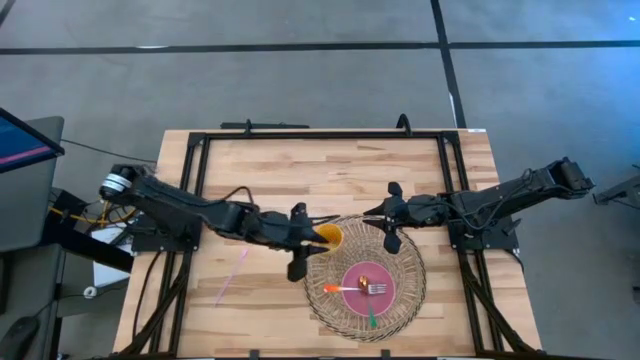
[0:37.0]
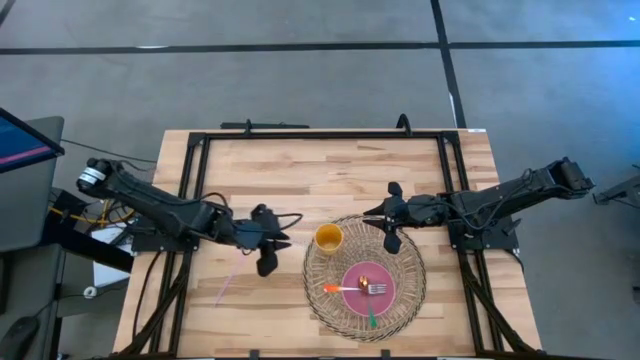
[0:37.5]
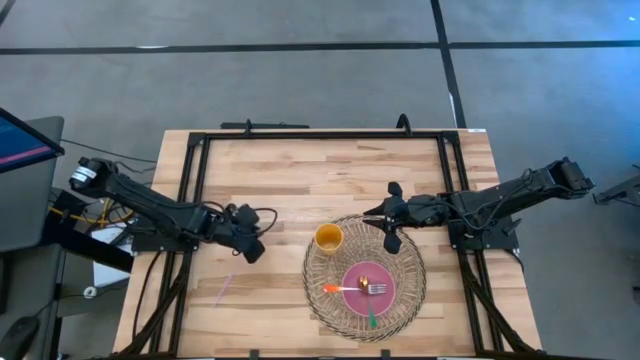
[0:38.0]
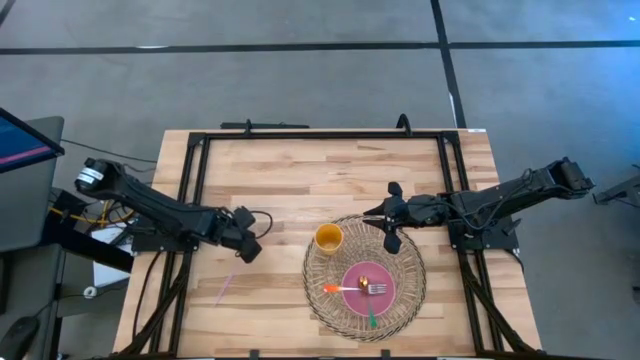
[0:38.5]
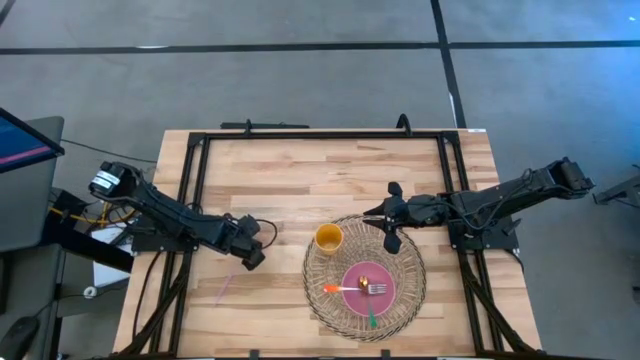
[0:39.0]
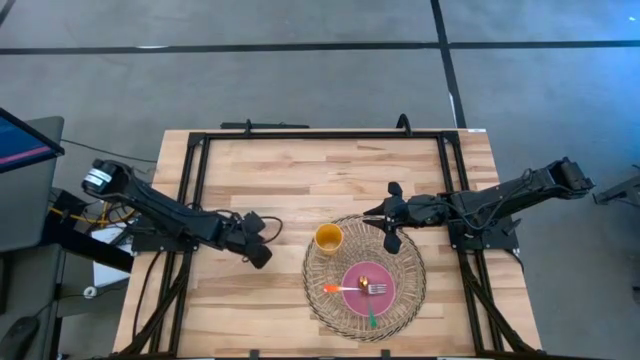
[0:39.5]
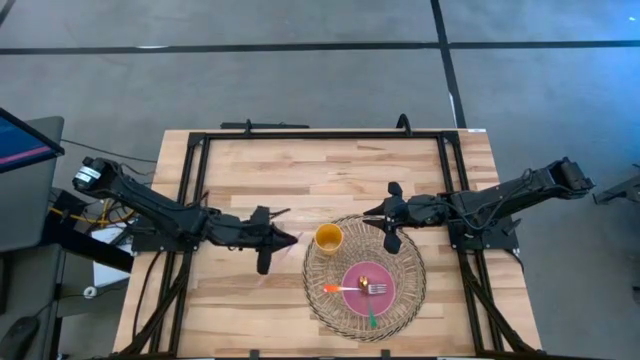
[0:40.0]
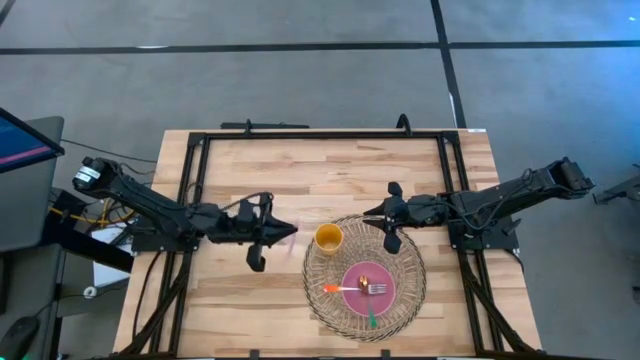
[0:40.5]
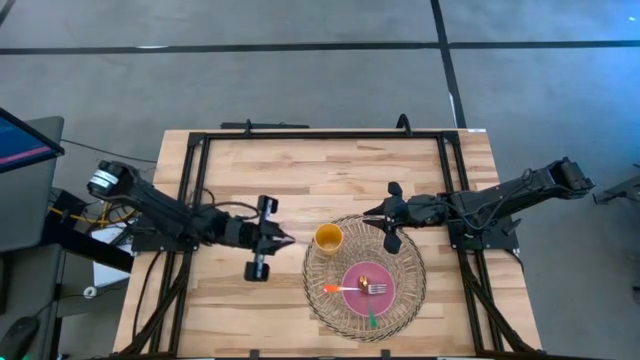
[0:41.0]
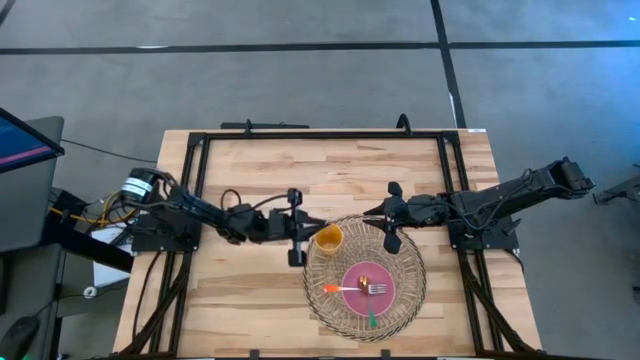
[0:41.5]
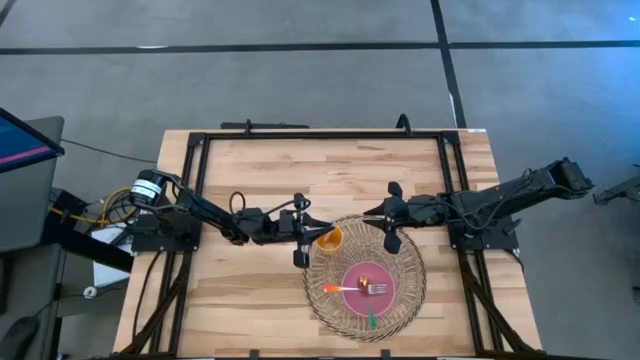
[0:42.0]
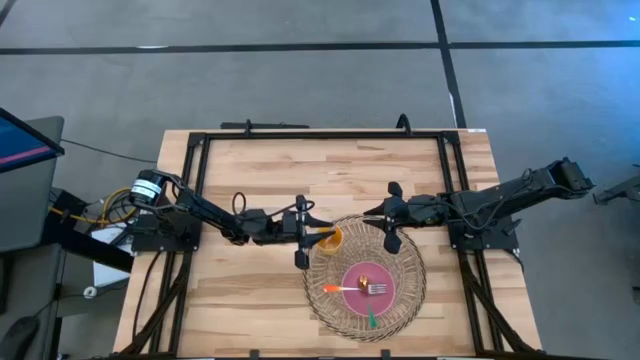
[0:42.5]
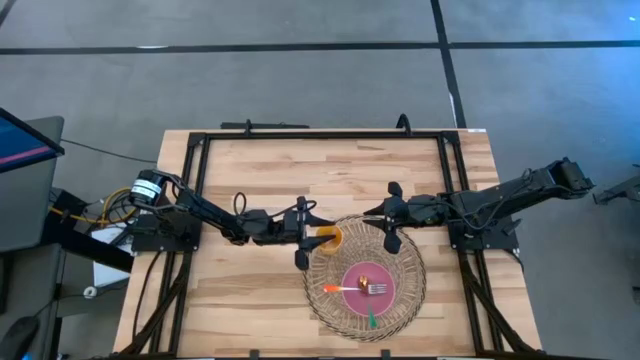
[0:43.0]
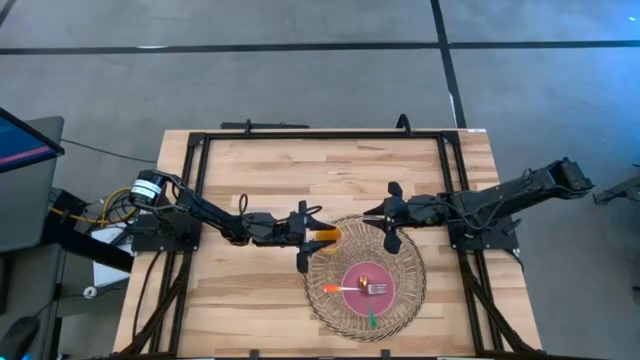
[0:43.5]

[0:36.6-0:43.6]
Task: Pick & Place Utensil
Put the pink straw into the yellow cup

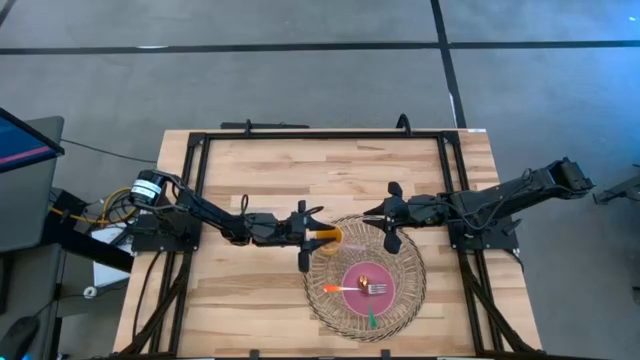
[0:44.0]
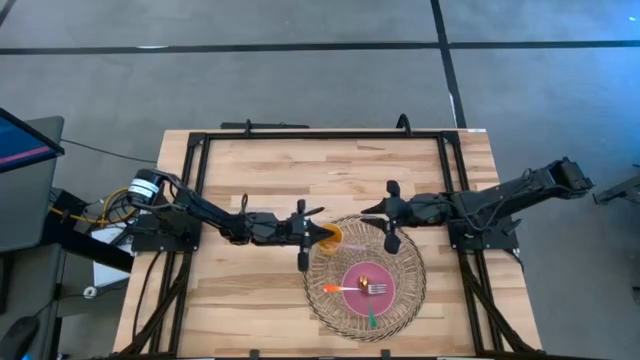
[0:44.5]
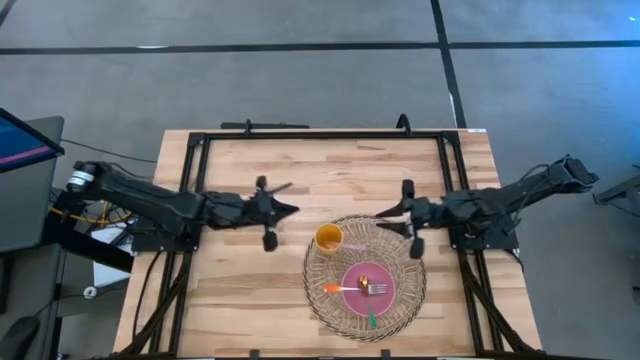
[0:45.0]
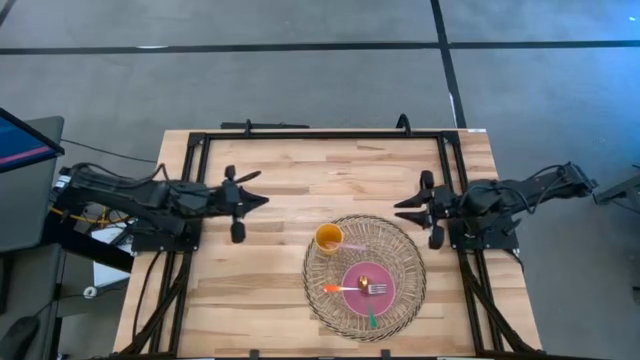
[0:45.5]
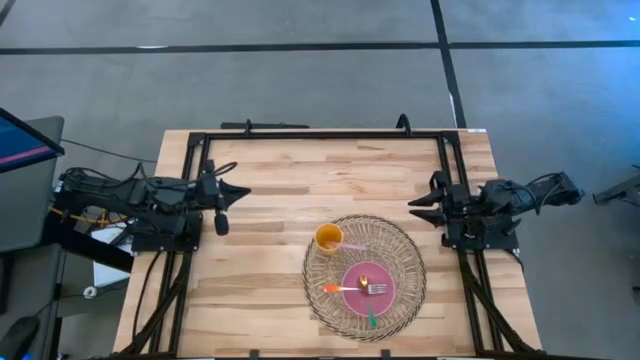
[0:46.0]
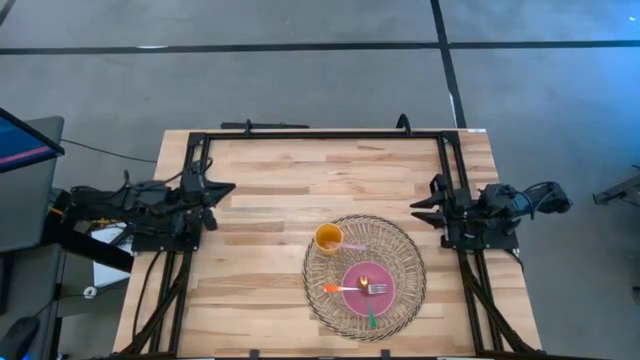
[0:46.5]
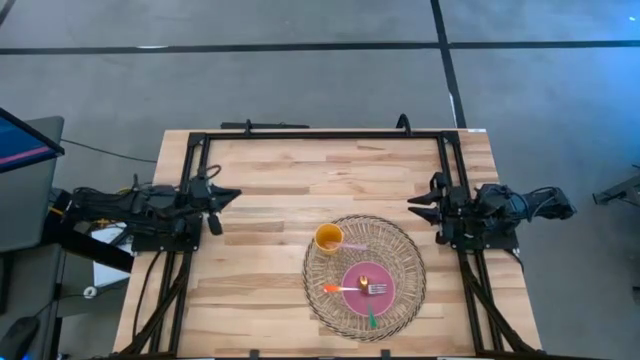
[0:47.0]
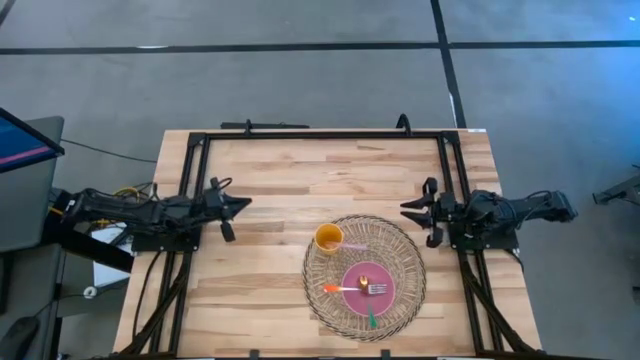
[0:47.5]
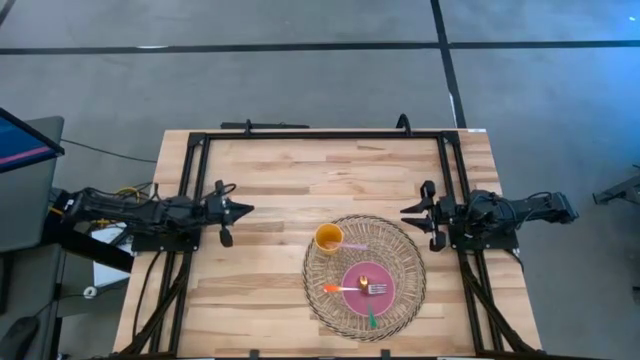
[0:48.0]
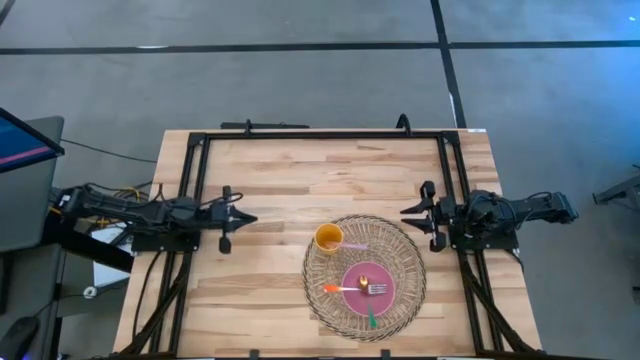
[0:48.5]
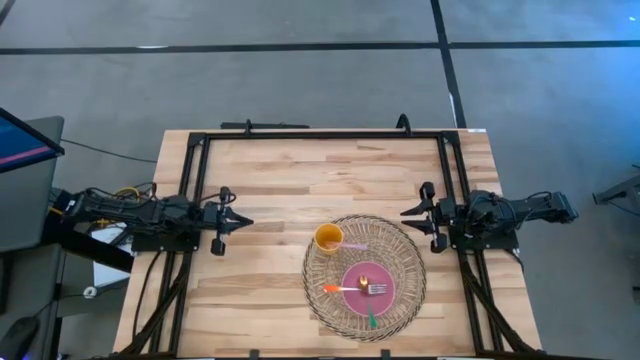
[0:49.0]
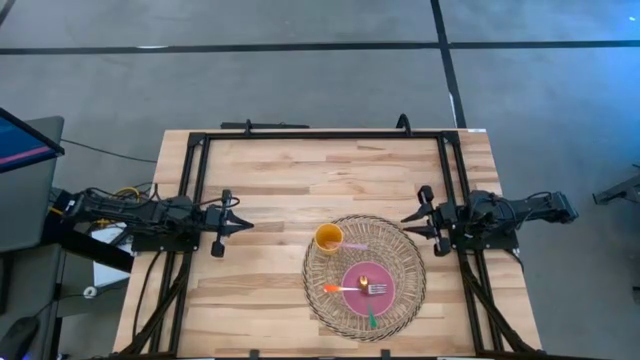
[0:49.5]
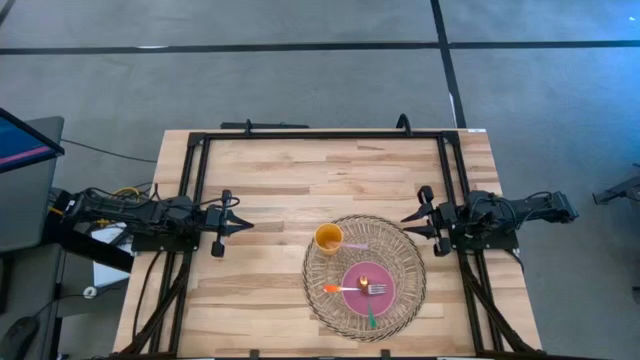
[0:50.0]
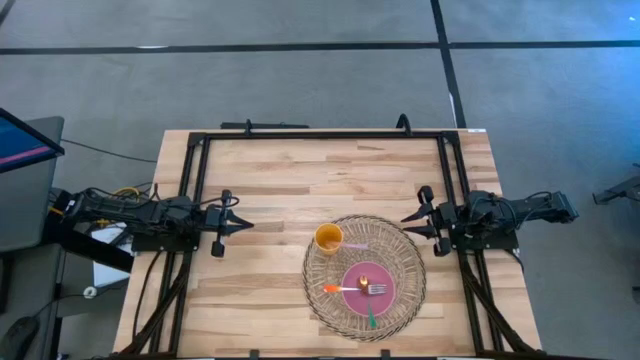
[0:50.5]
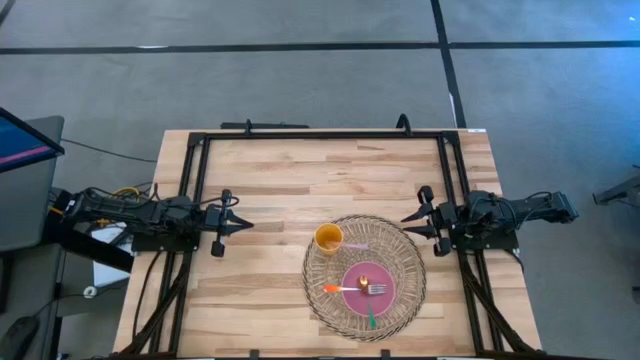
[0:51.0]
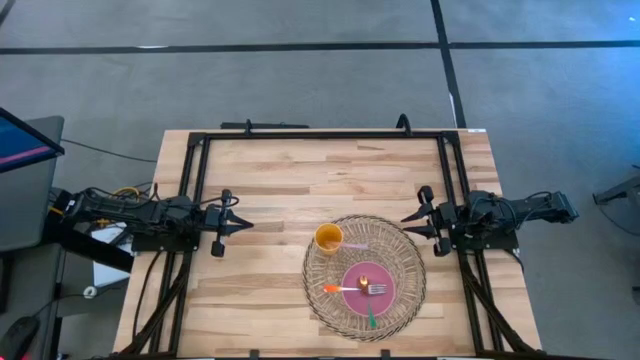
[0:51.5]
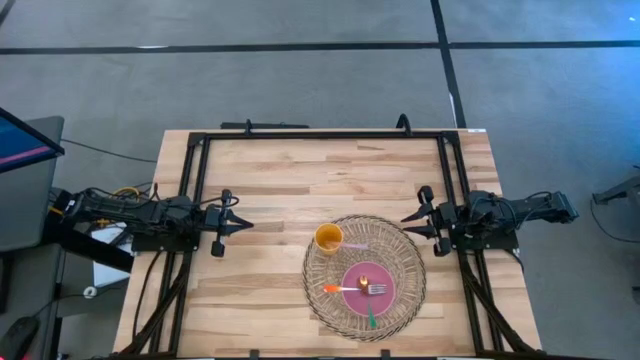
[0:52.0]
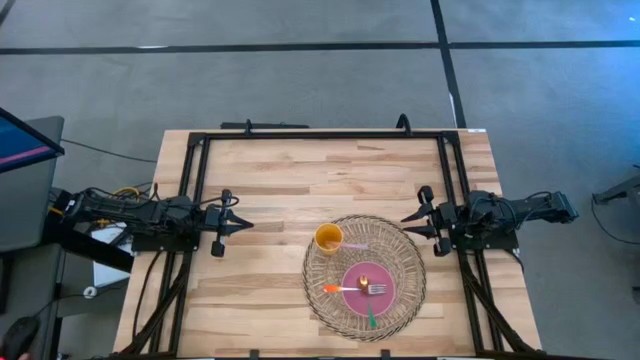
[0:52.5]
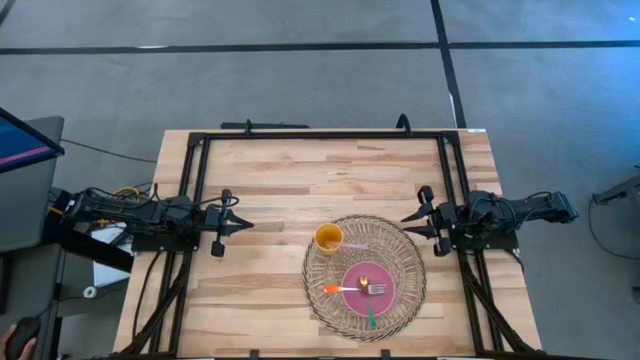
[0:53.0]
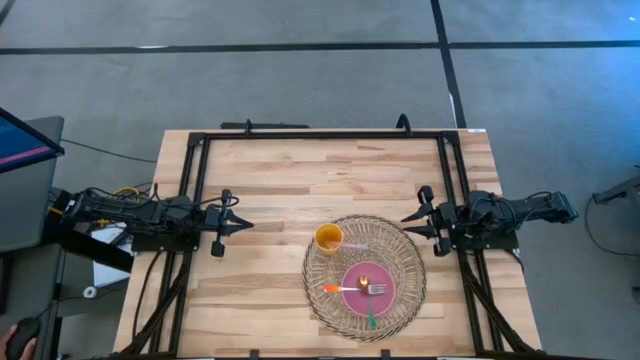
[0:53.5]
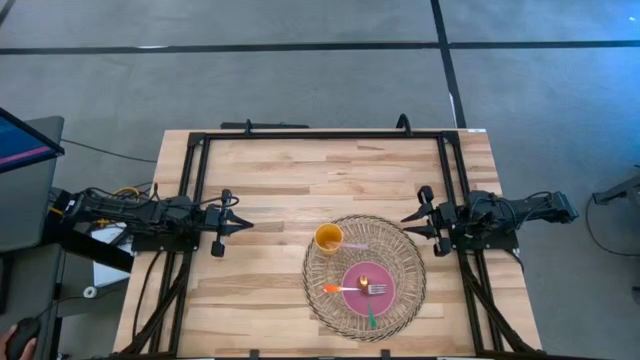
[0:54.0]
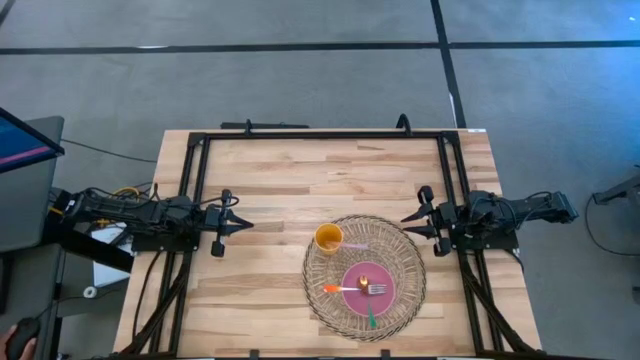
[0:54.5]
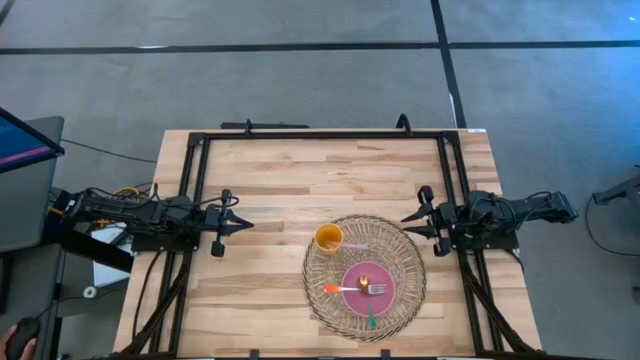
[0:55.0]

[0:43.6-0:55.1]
Return to Home Position

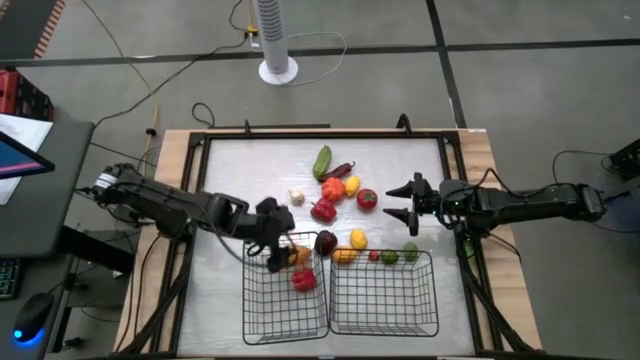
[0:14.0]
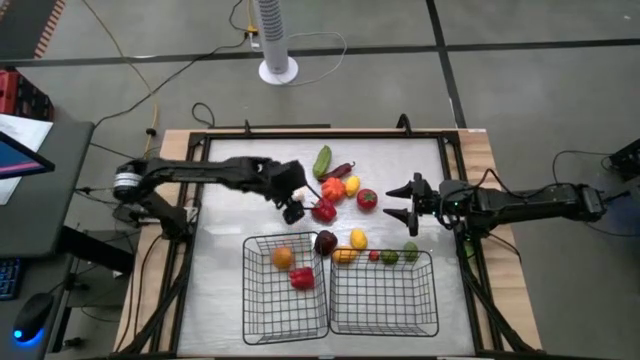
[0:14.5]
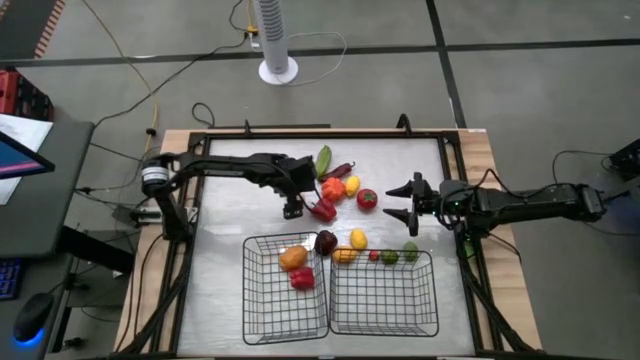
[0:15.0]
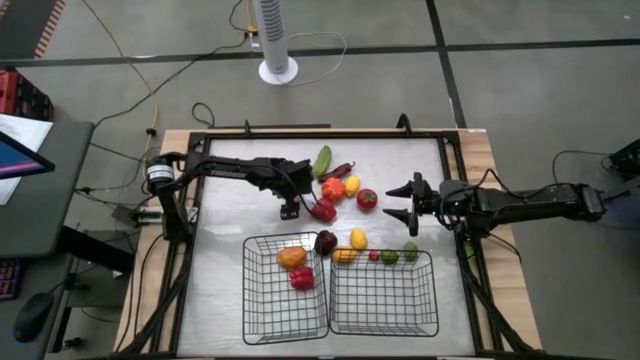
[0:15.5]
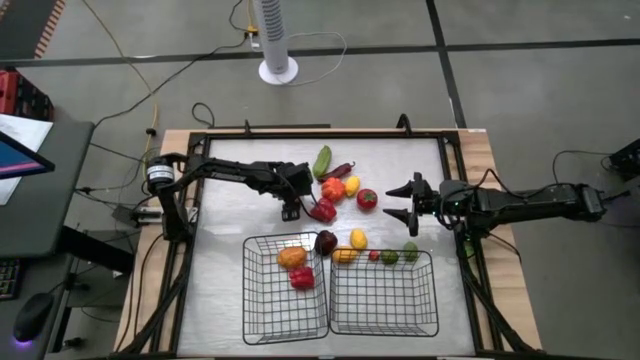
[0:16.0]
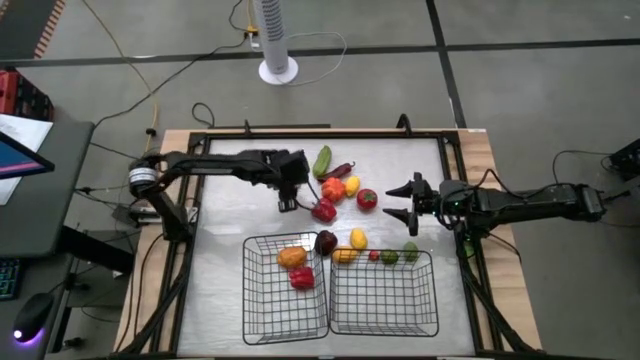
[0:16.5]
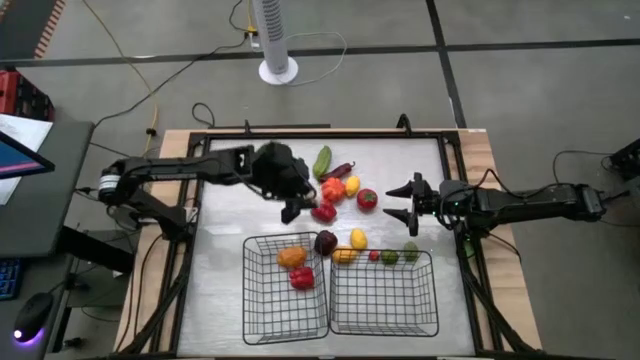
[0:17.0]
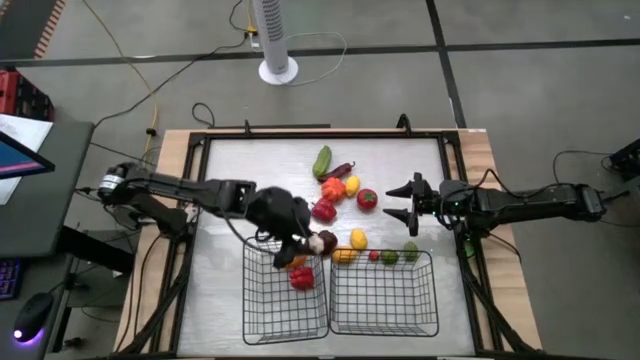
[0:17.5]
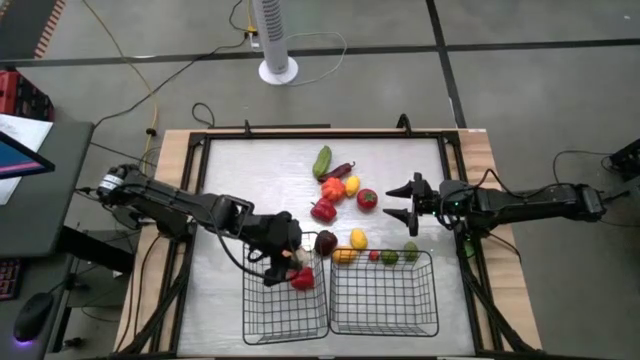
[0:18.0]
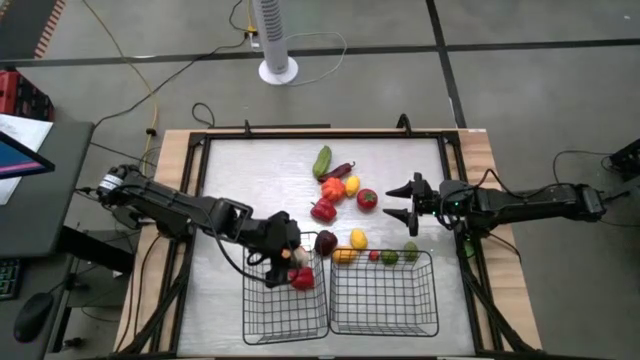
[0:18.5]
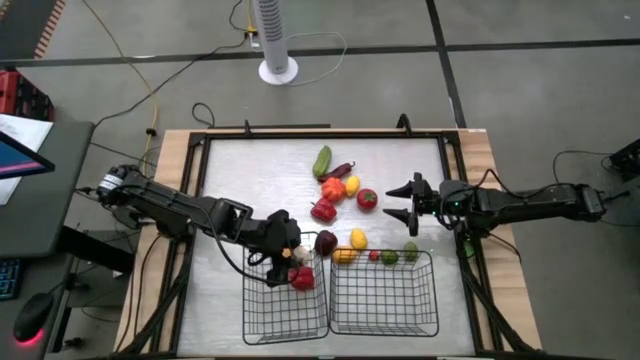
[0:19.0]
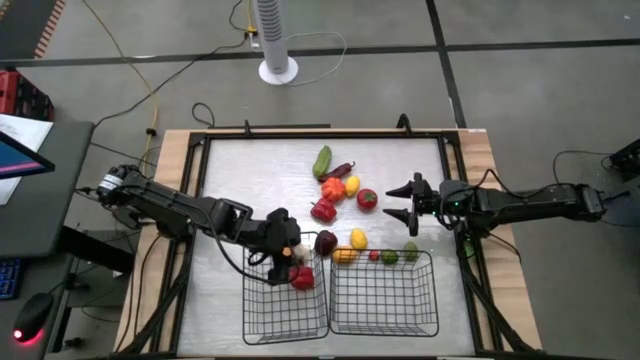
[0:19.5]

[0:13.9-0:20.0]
Task: Sort produce into baskets
Put the white garlic into the left black wire basket
